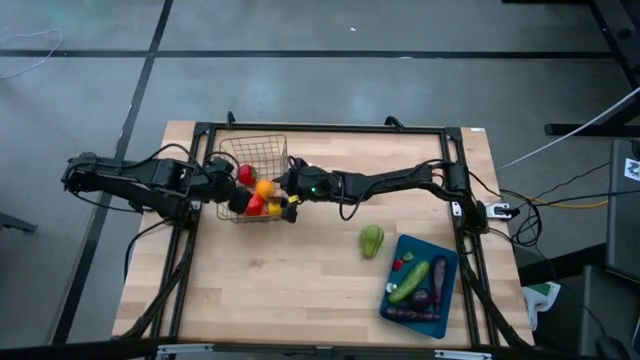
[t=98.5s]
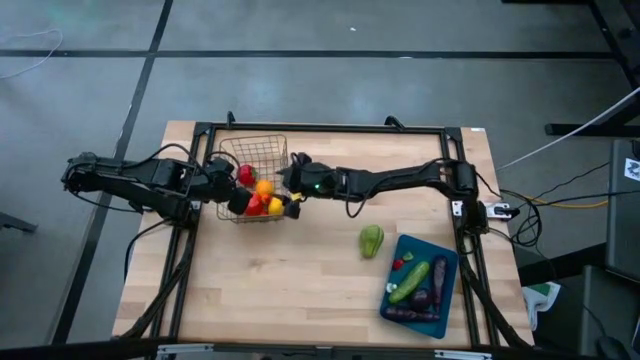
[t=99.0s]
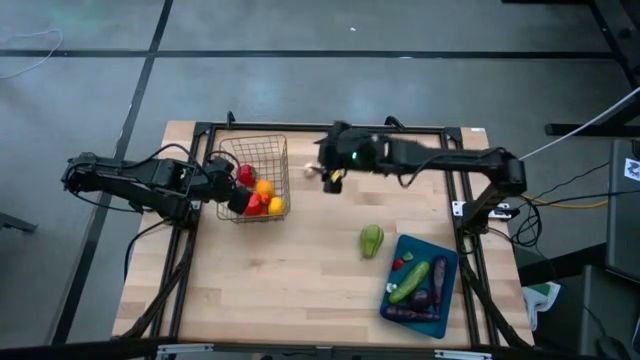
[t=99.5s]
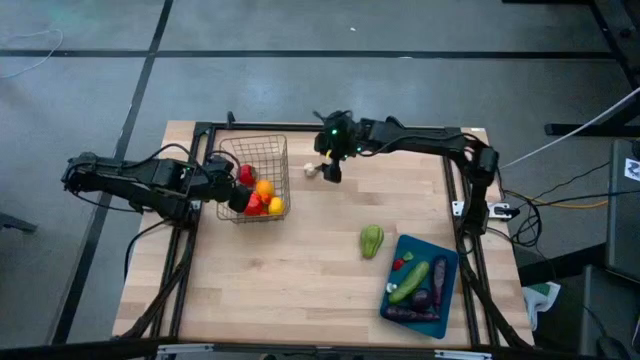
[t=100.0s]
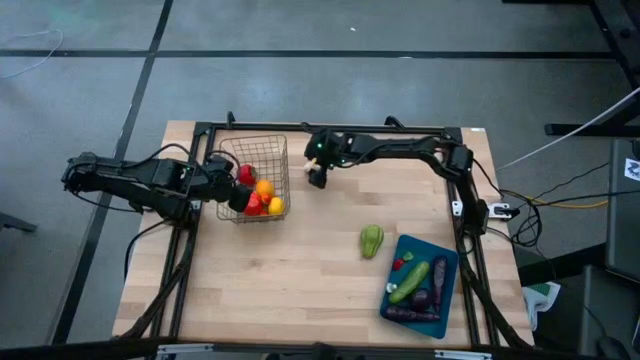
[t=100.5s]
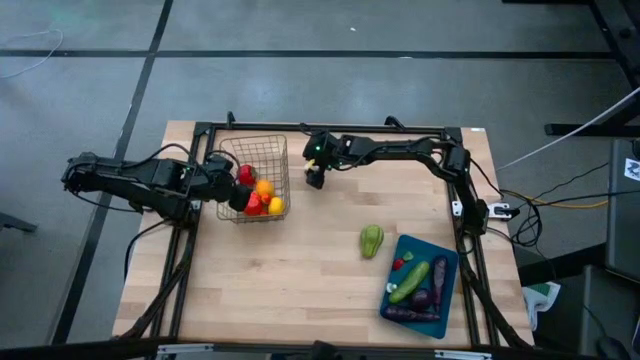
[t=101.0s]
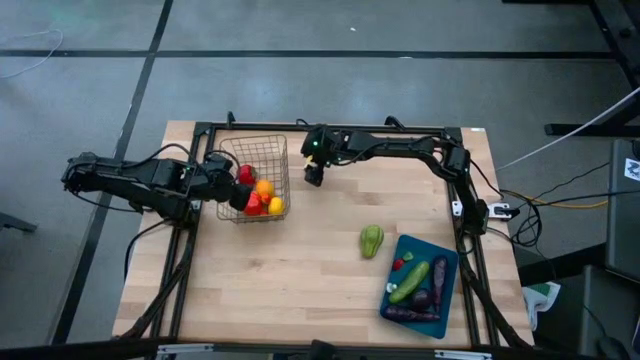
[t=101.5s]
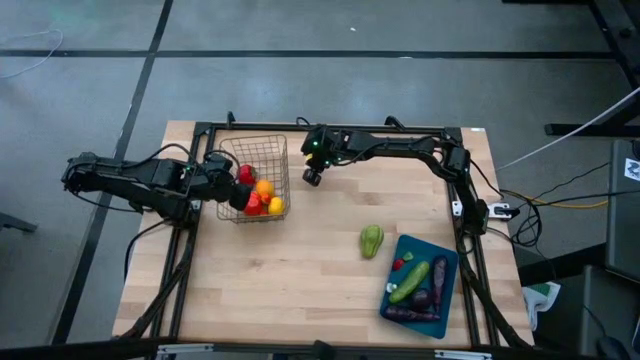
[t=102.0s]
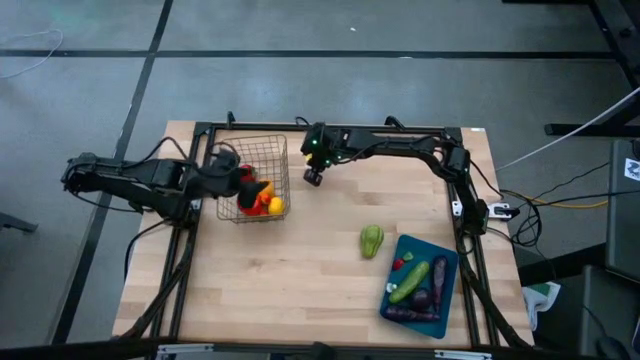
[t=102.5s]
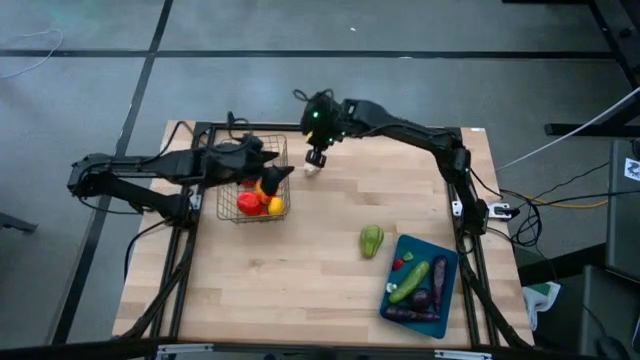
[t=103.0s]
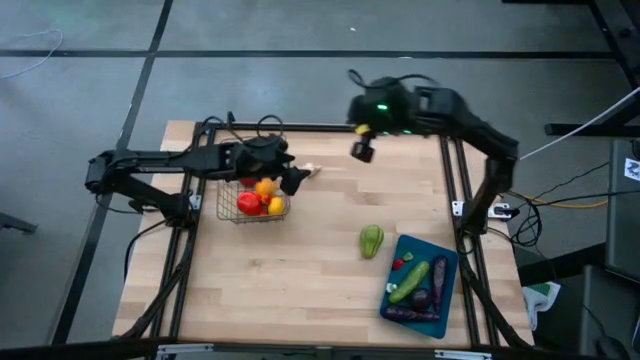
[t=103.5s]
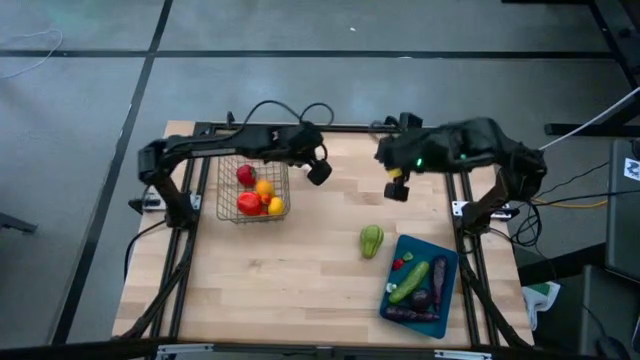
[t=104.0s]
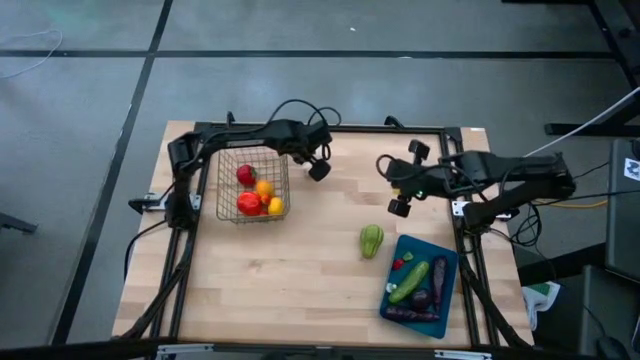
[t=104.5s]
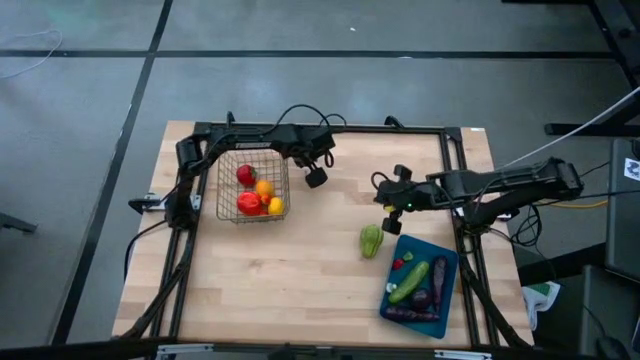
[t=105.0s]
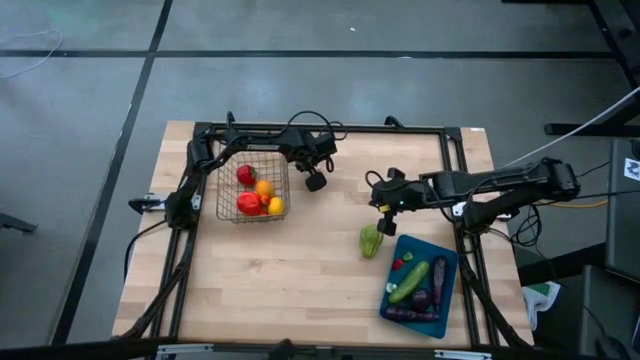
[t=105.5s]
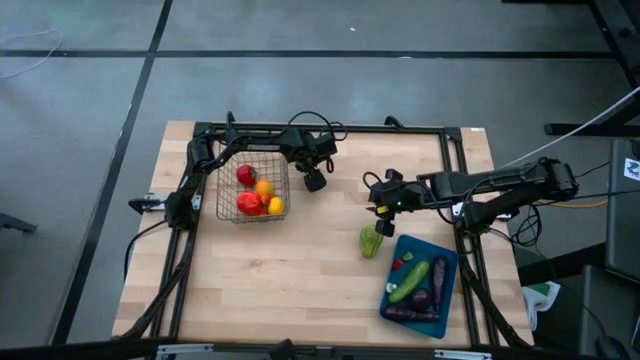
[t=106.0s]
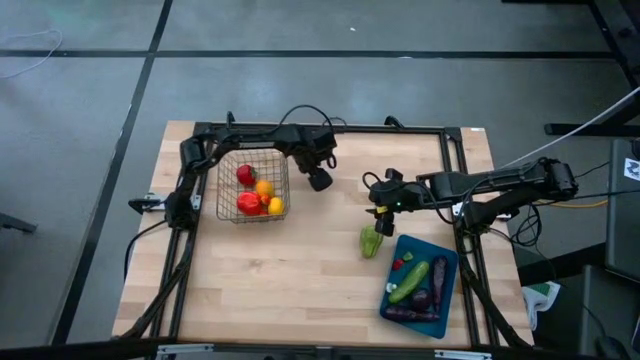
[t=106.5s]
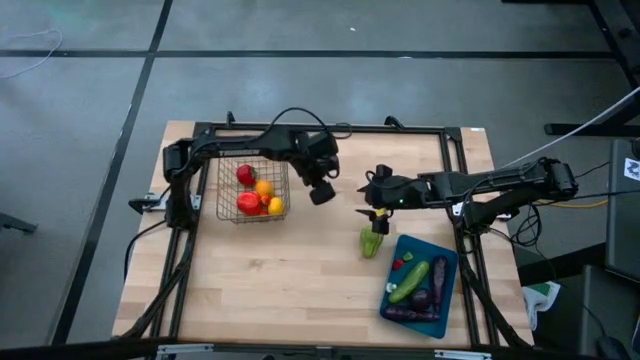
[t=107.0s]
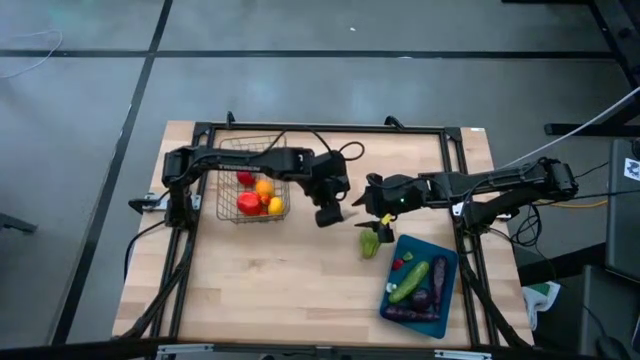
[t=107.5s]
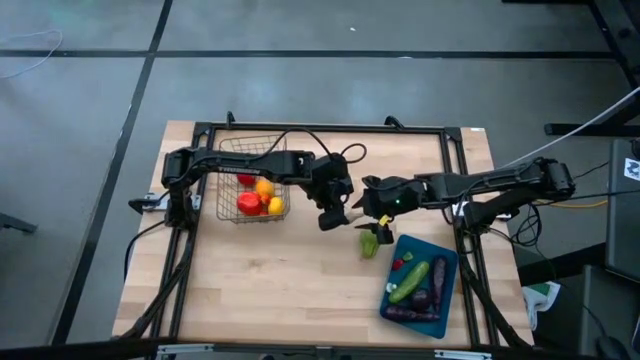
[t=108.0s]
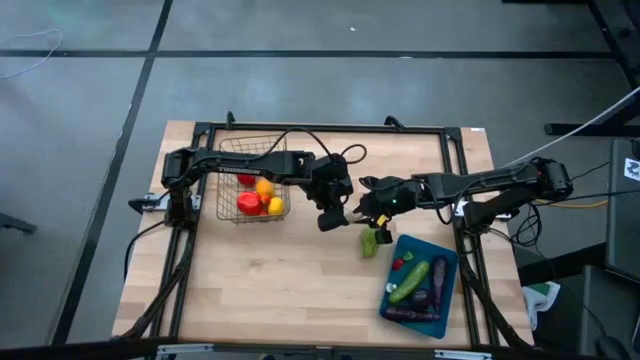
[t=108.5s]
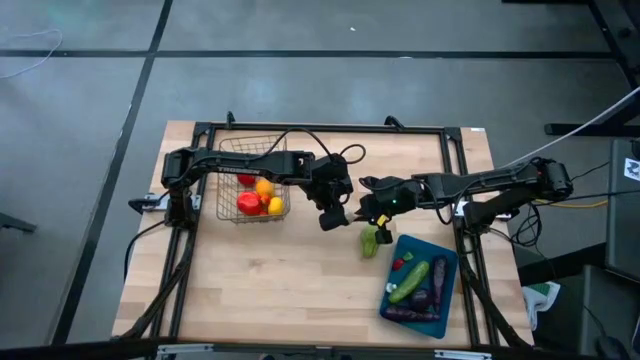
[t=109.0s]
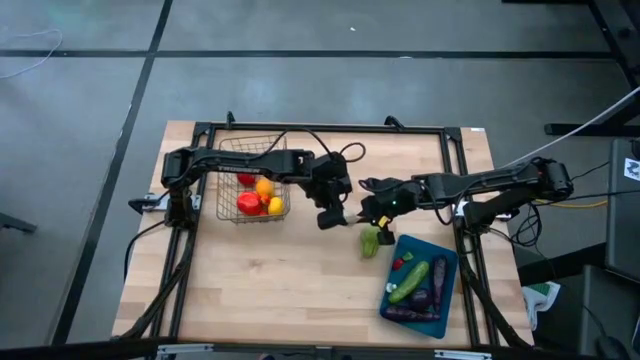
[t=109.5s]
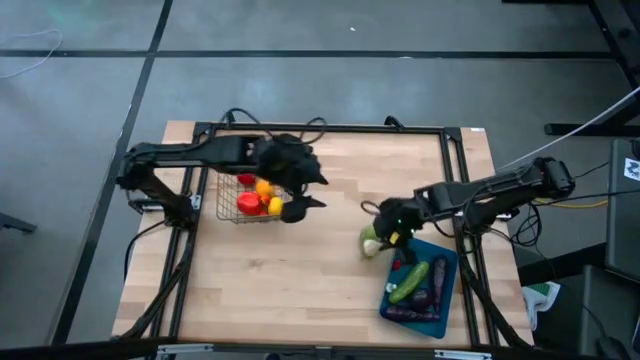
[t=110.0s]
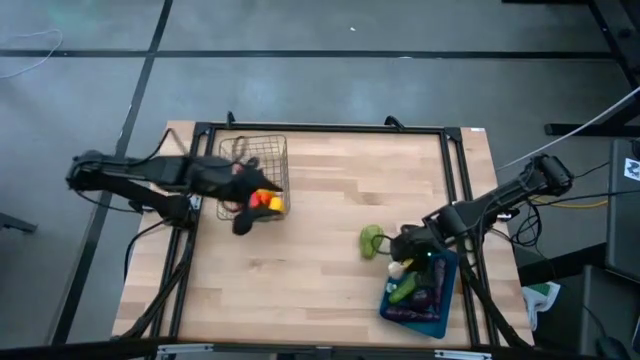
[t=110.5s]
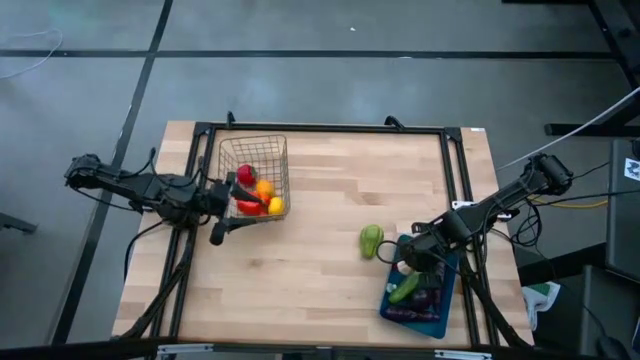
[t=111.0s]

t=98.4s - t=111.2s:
Task: Sort produce into baskets
Put the white garlic into the blue bin

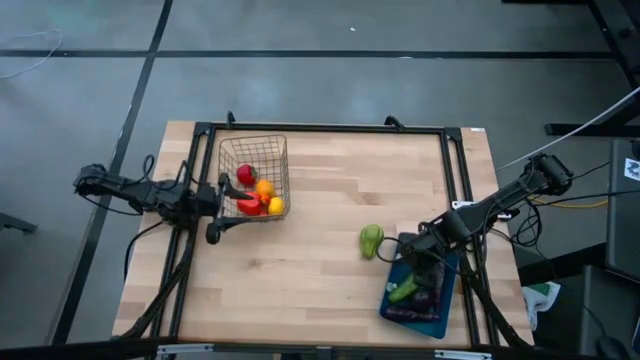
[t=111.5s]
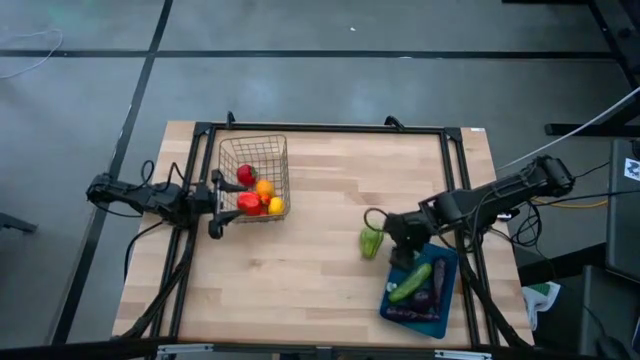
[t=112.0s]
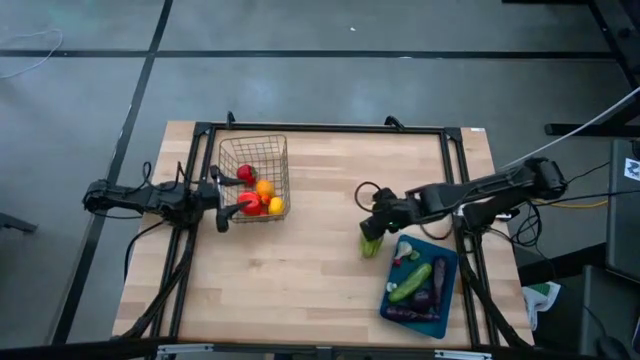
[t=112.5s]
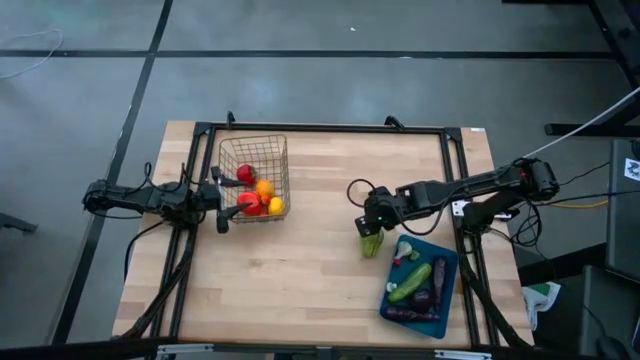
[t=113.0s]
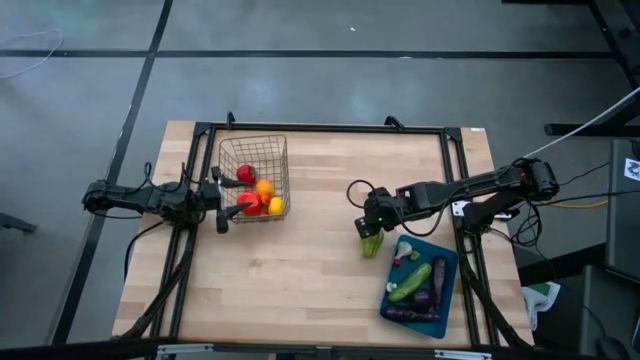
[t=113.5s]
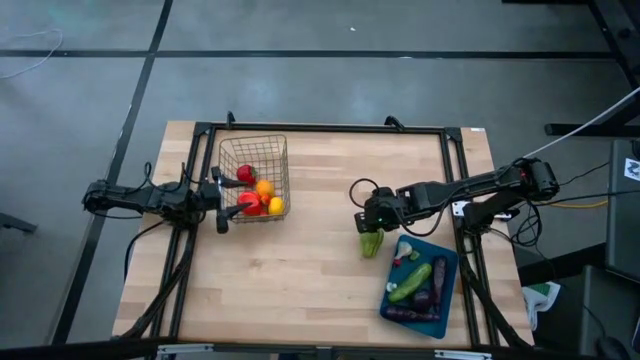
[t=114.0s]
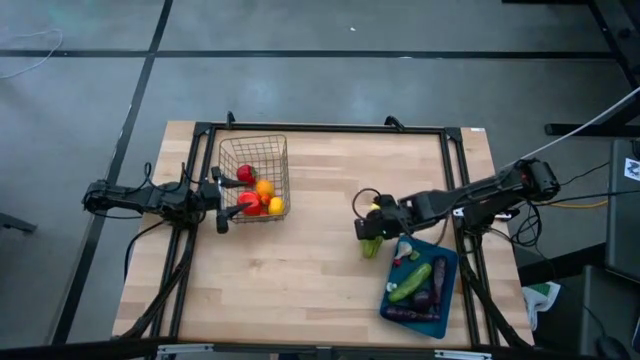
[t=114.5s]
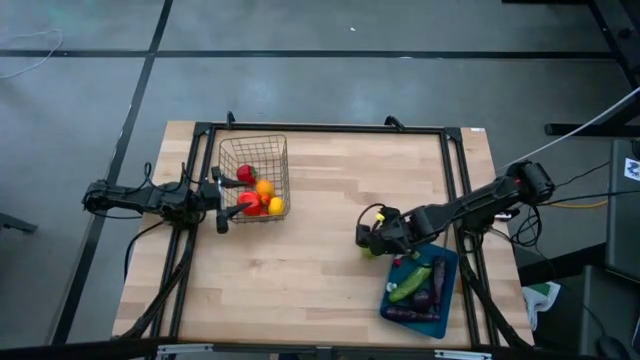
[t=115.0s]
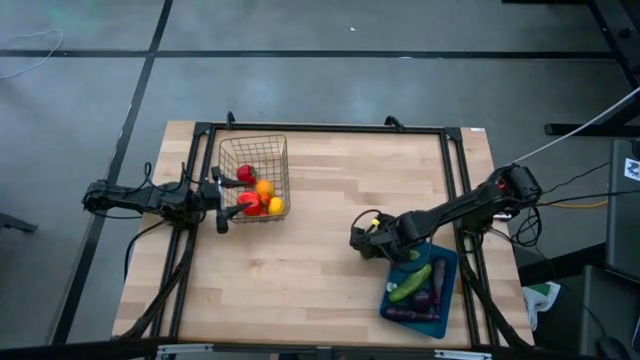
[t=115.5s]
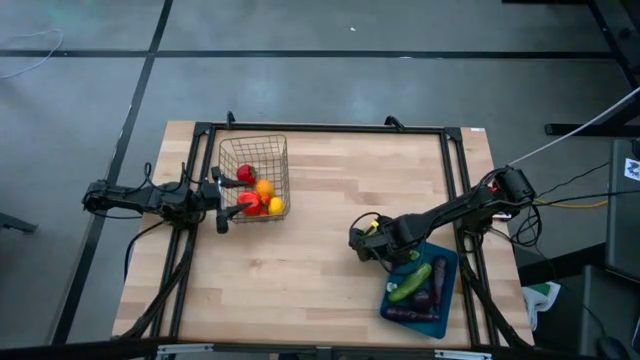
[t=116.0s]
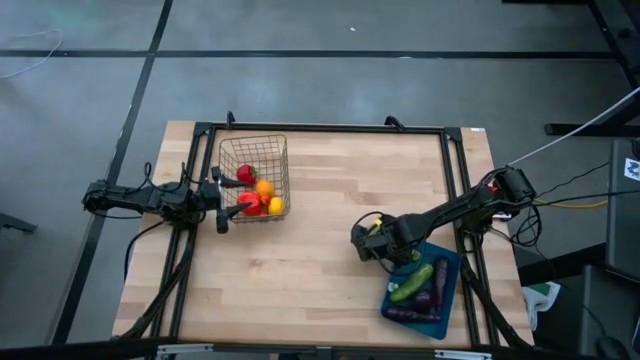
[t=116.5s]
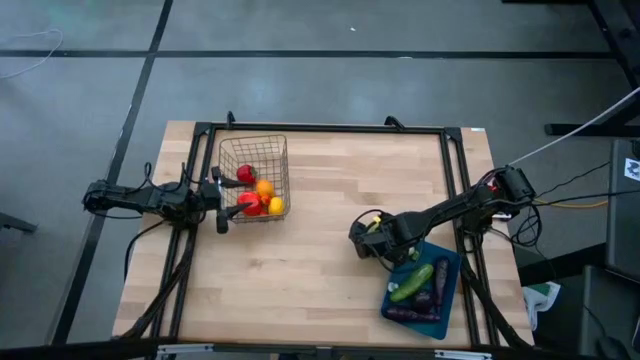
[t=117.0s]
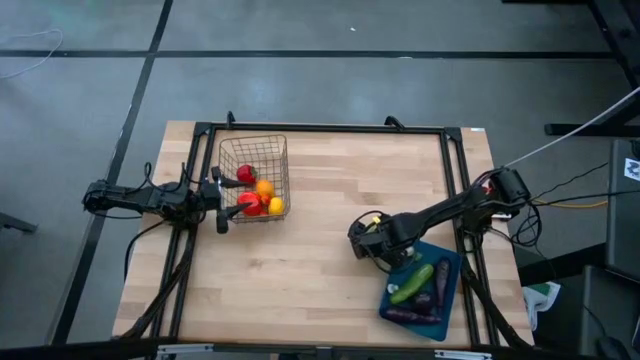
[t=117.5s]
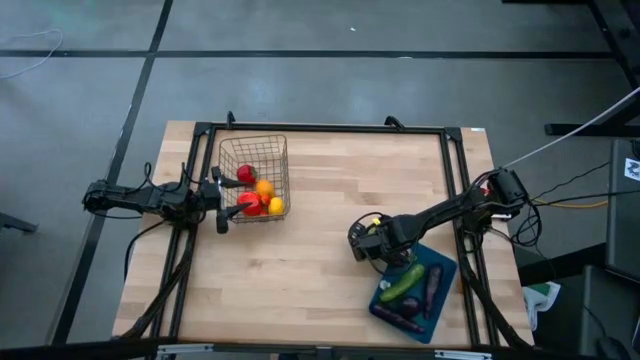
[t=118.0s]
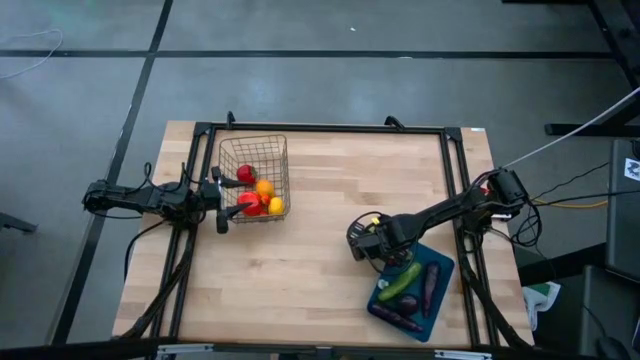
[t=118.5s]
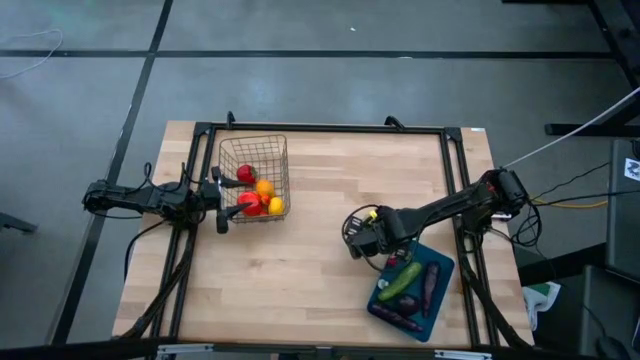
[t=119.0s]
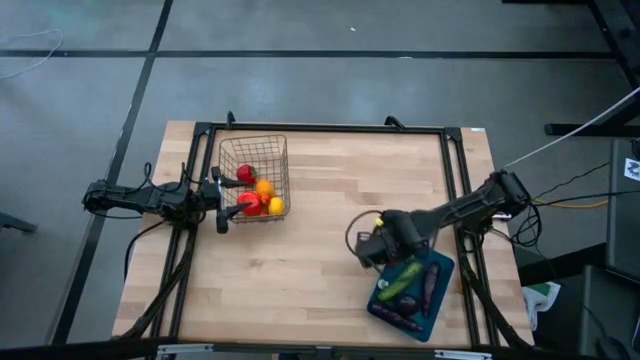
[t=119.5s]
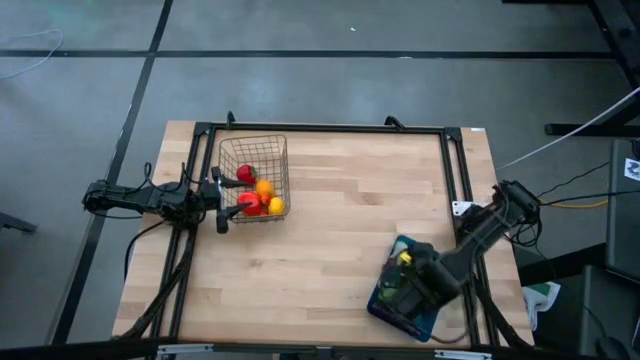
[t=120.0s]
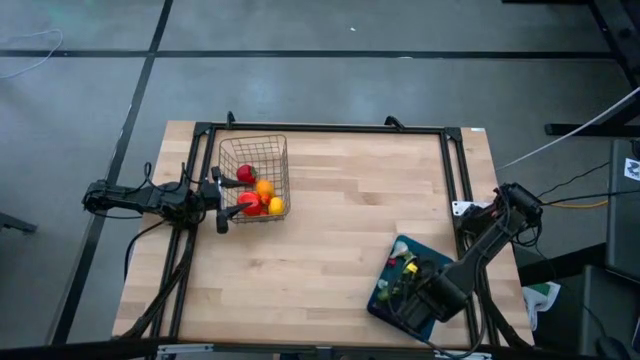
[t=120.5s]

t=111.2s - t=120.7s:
Put the green chayote into the blue bin

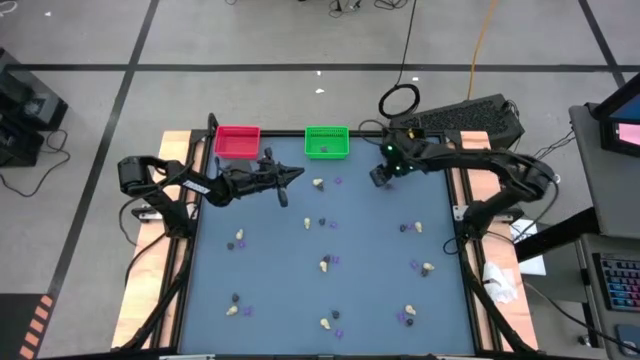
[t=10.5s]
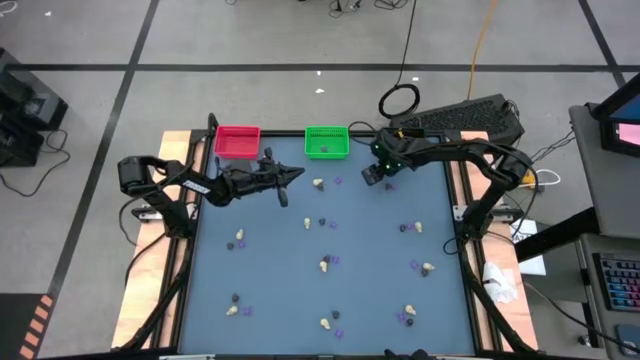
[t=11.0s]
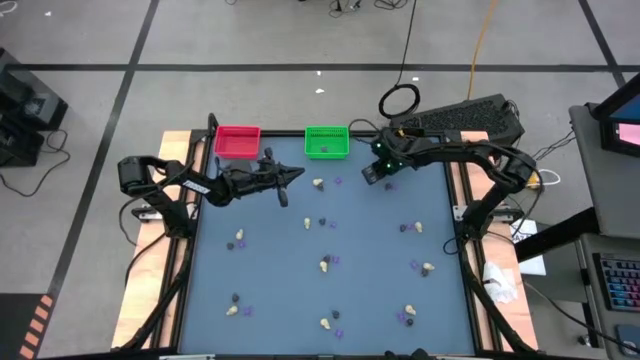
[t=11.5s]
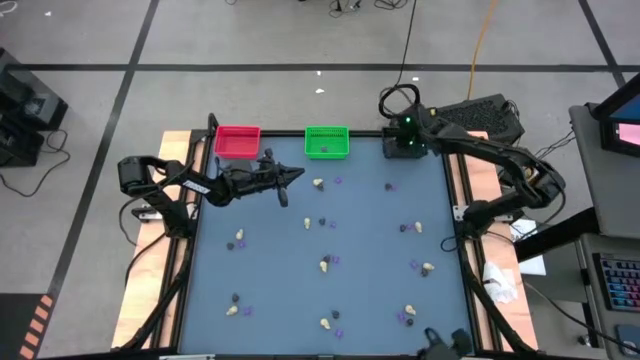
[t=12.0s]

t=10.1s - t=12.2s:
Task: Sort Halloween decoration
Put the white skull toy into the black bin
